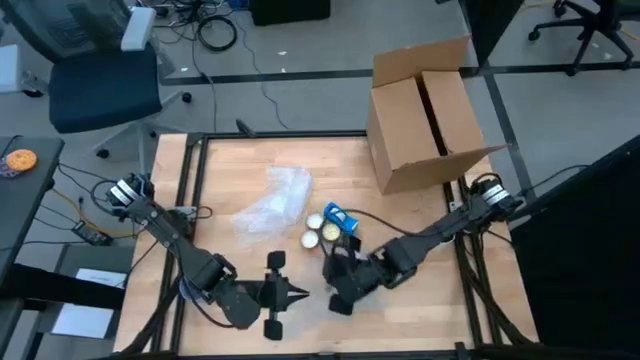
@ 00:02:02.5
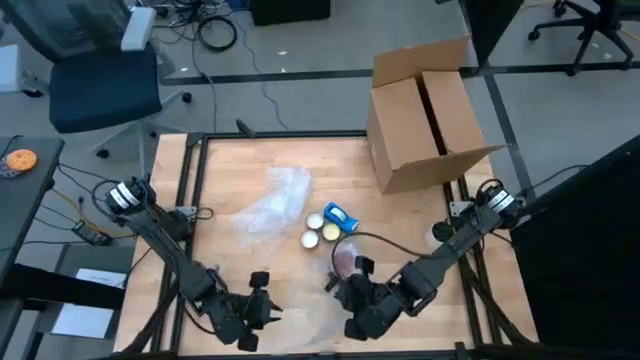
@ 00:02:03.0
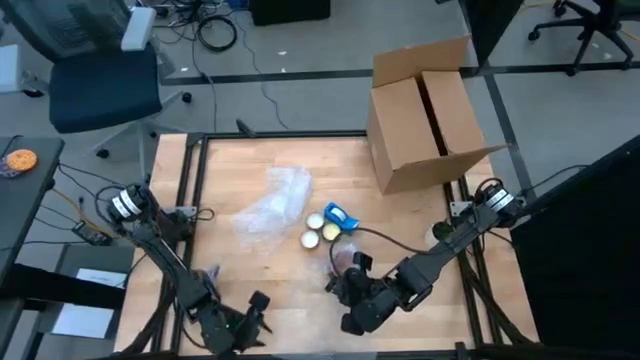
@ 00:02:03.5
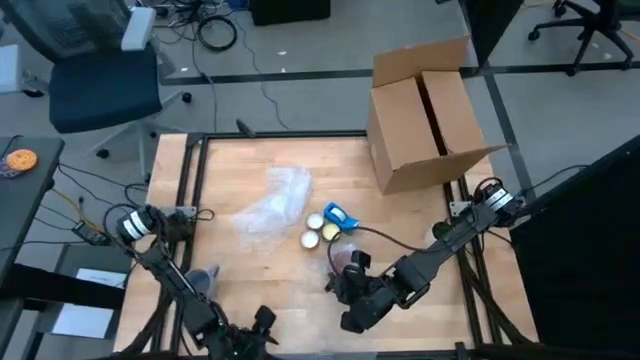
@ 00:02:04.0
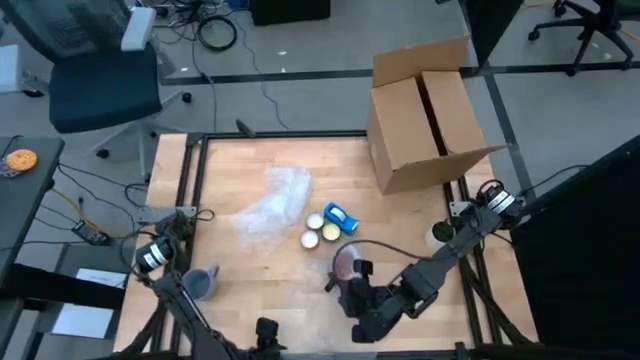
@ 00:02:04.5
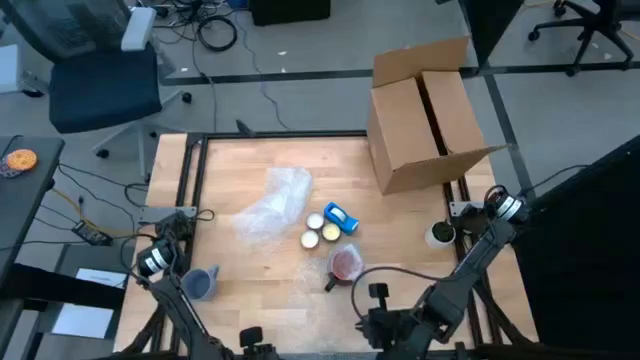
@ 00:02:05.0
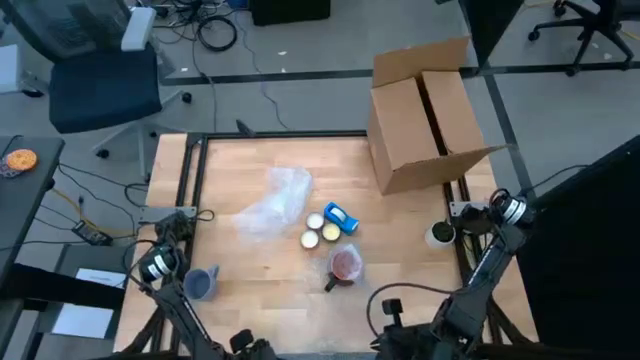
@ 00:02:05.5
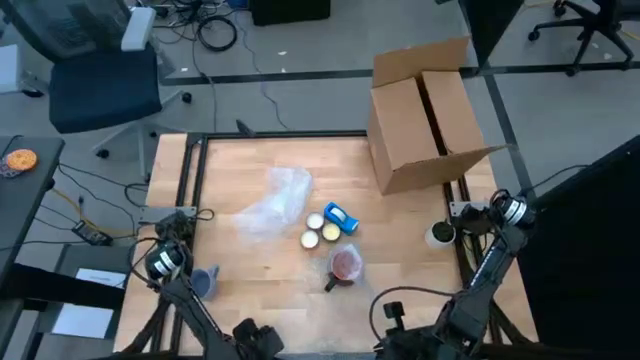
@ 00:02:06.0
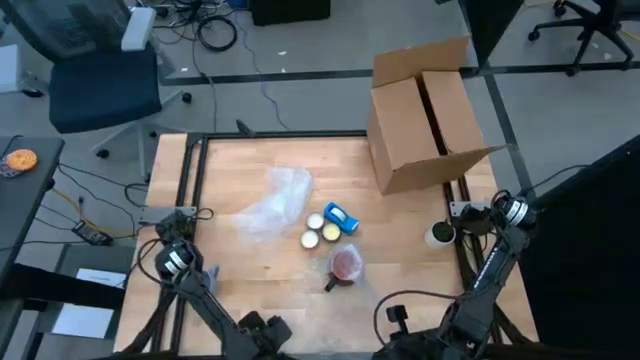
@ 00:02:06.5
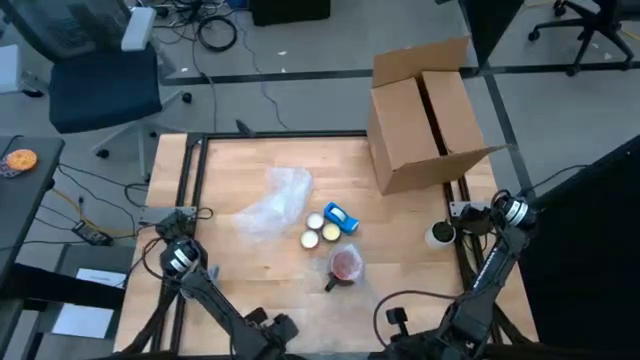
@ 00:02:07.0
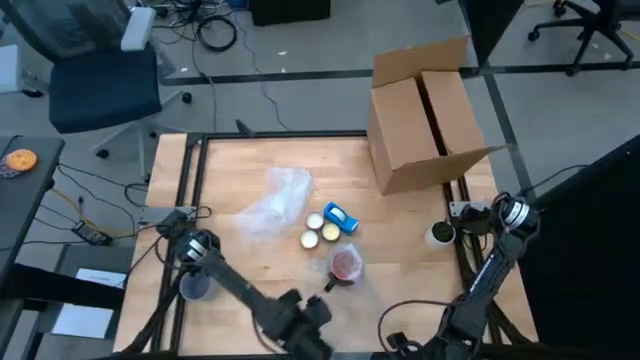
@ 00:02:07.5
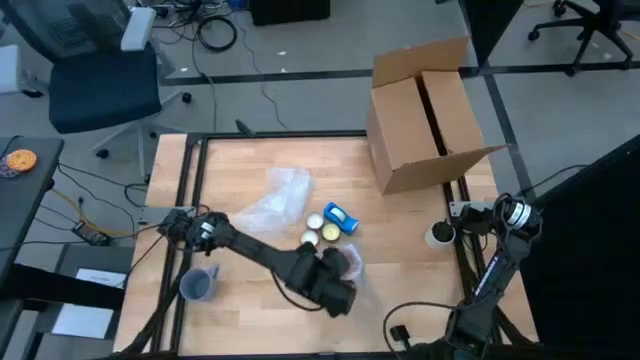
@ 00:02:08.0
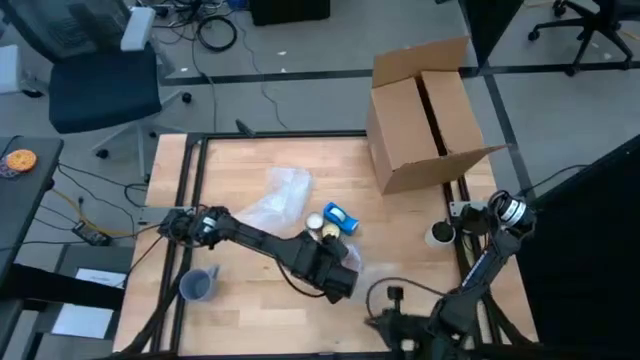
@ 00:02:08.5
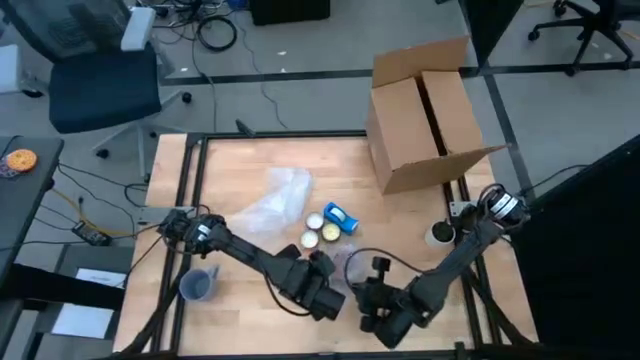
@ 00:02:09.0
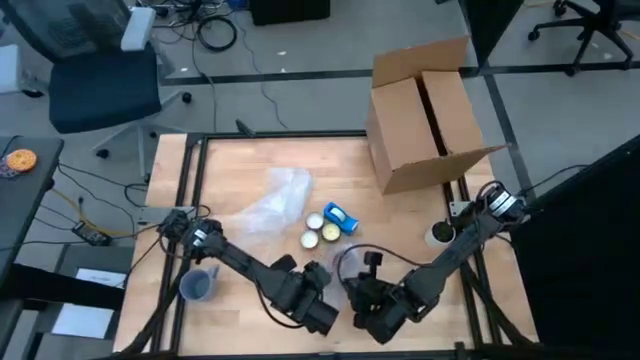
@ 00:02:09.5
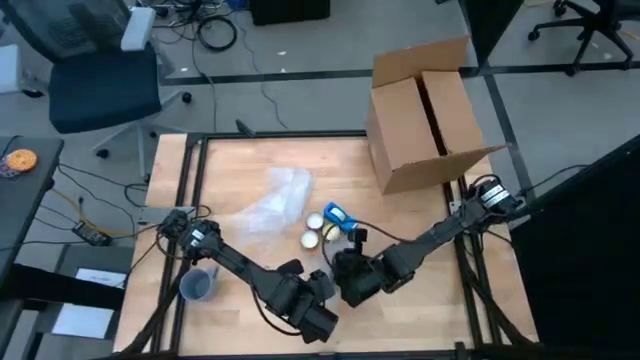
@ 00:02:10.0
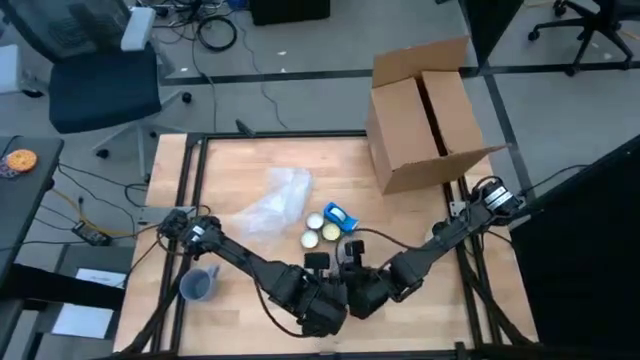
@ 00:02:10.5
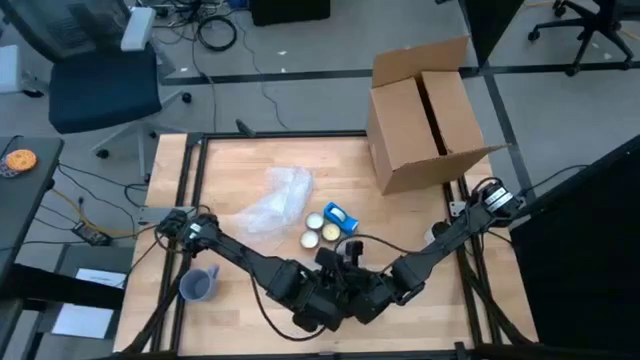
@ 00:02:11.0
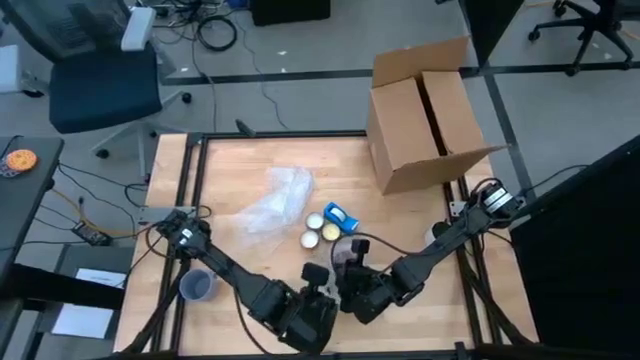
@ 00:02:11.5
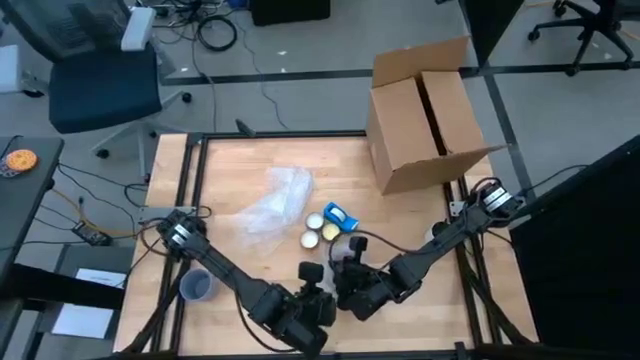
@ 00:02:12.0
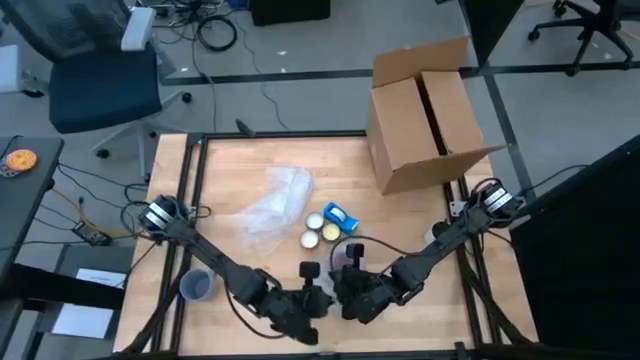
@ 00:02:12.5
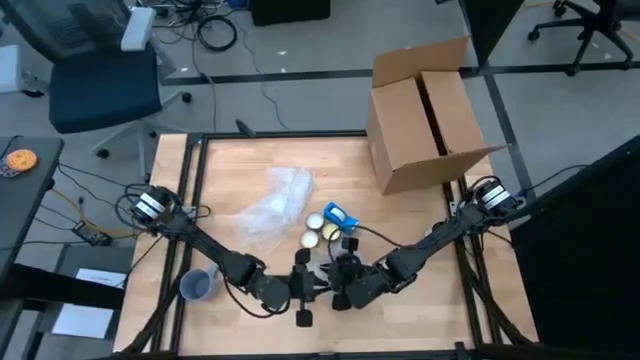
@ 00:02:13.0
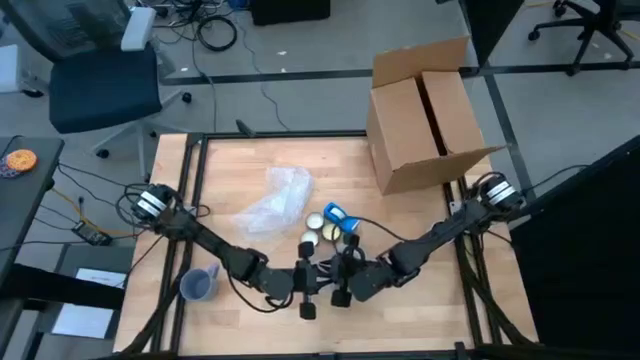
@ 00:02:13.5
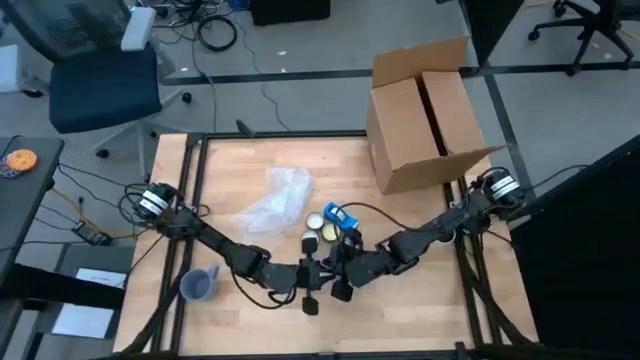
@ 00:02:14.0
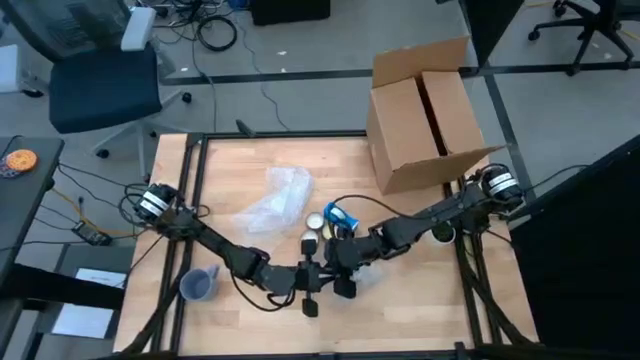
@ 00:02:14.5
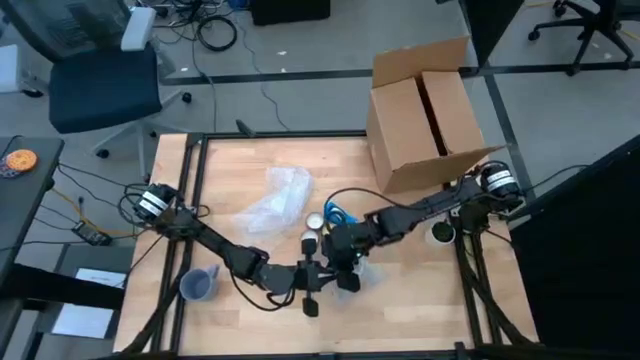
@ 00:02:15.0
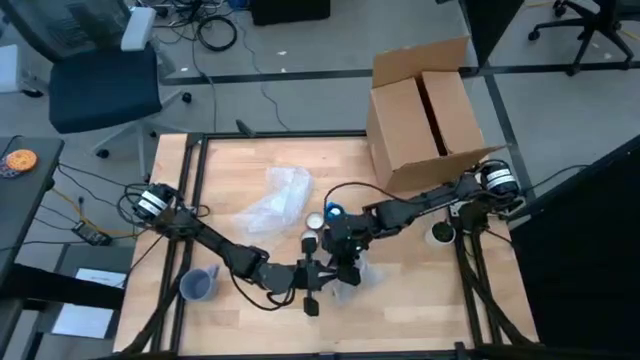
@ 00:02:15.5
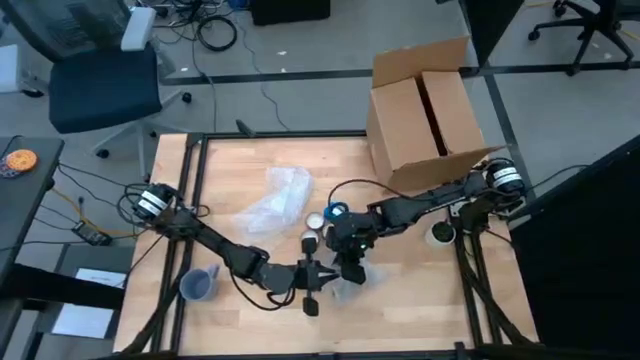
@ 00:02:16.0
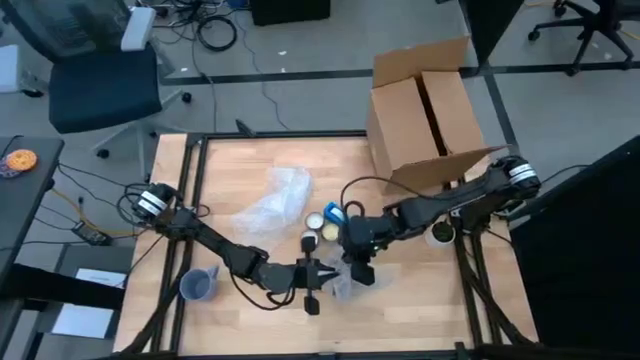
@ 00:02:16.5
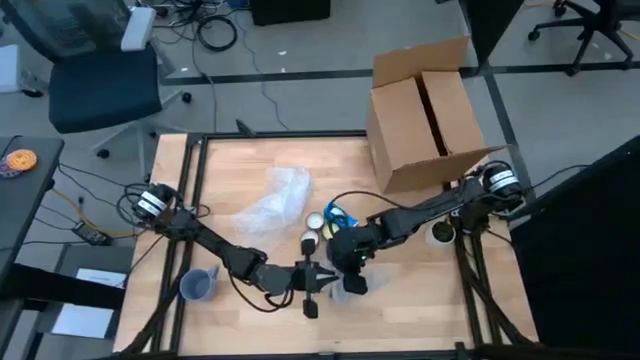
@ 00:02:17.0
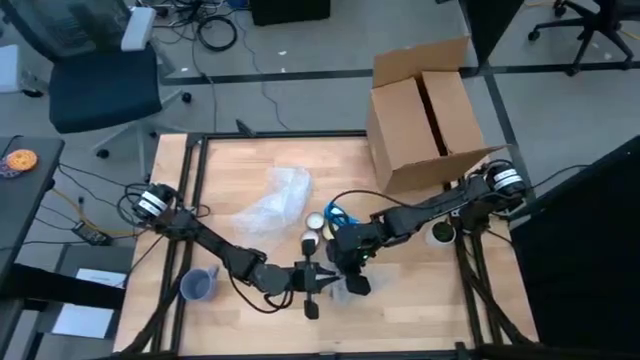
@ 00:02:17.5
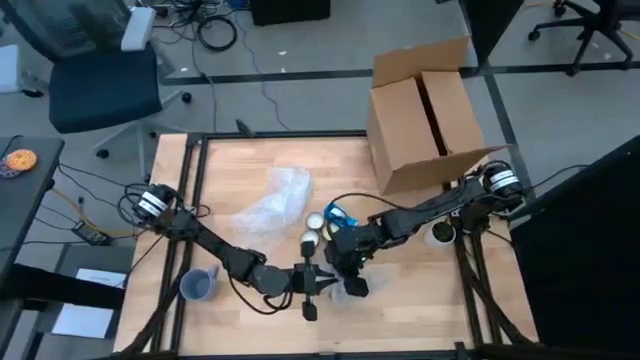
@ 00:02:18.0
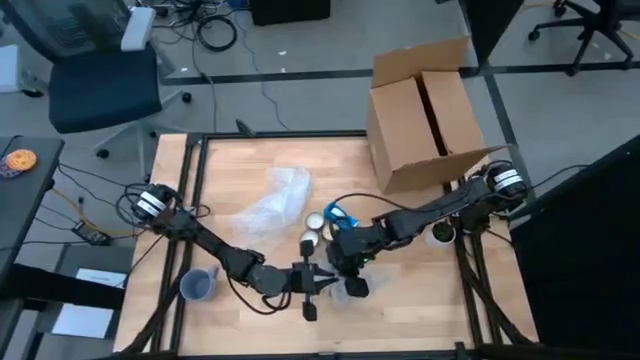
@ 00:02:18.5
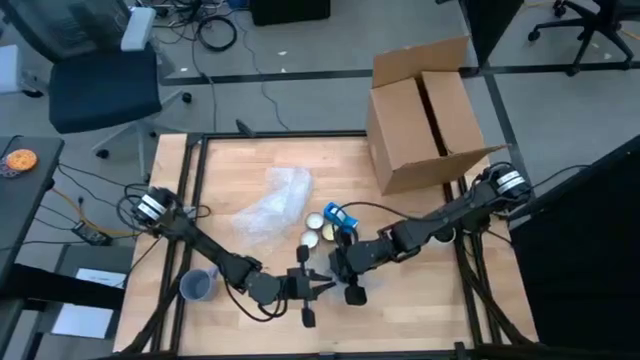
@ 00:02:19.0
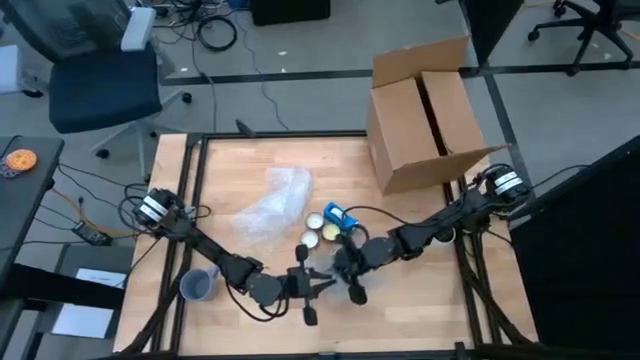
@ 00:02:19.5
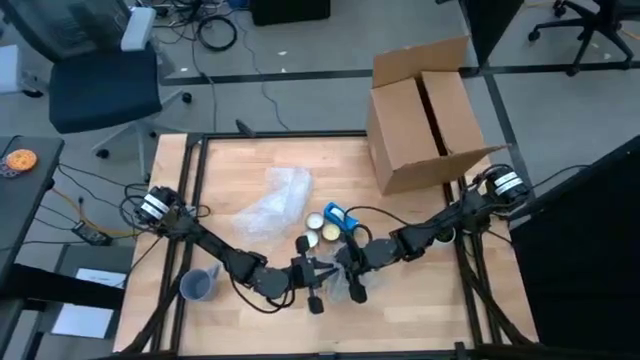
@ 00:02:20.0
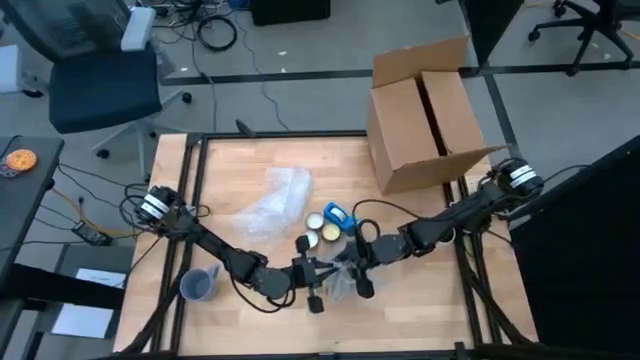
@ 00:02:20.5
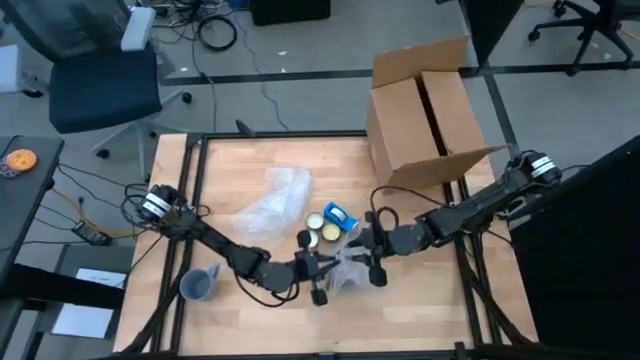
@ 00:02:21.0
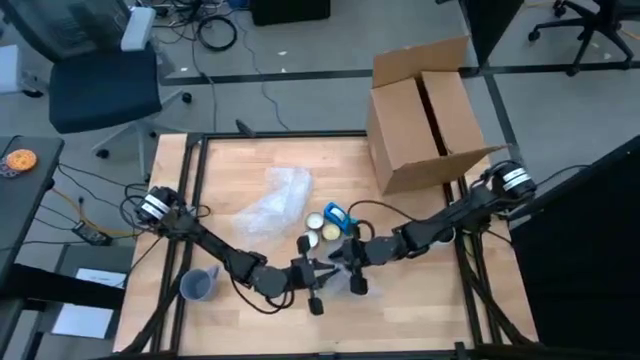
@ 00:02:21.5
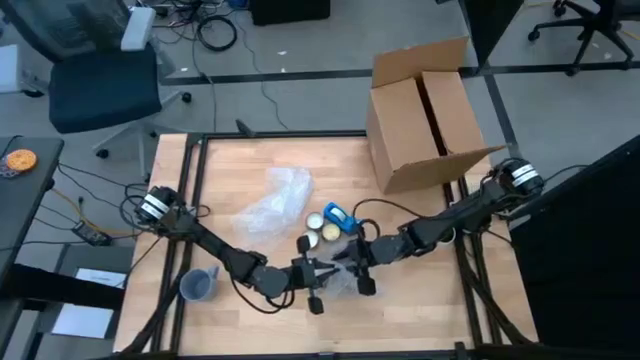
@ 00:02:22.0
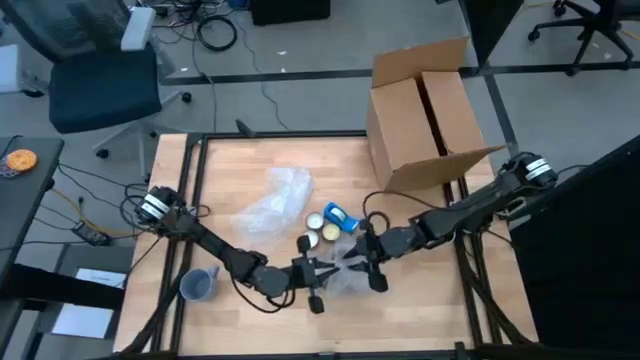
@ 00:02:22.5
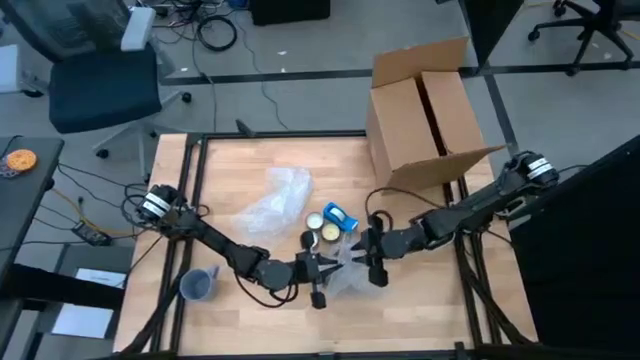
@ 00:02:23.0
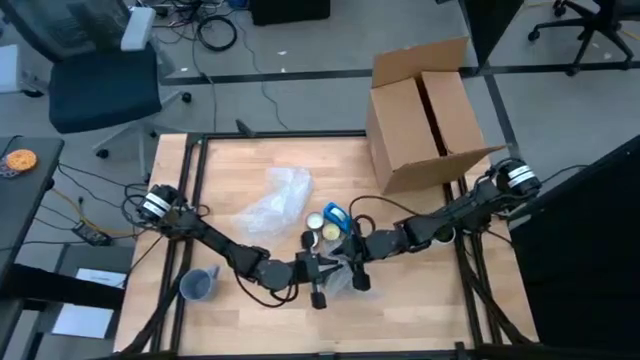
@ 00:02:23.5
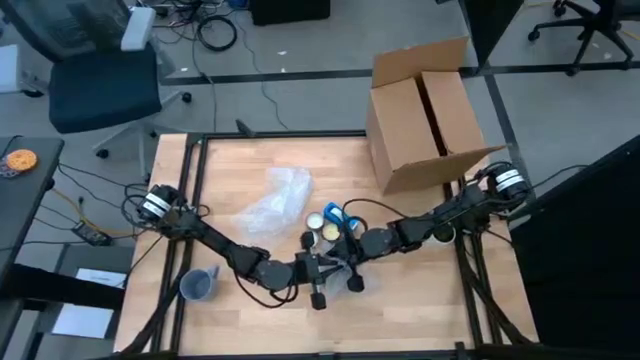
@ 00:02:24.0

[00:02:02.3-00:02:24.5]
Task: wrap mug
Wrap the black mug with the transparent bubble wrap
